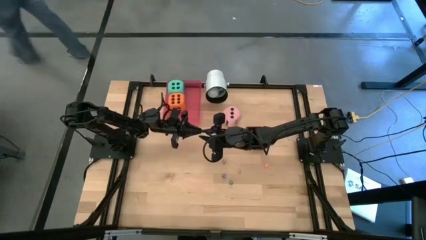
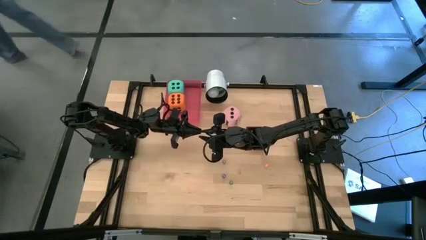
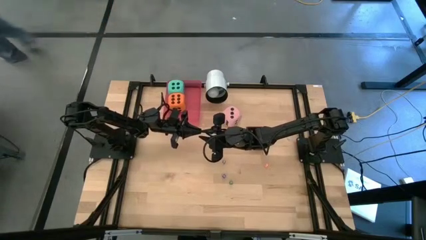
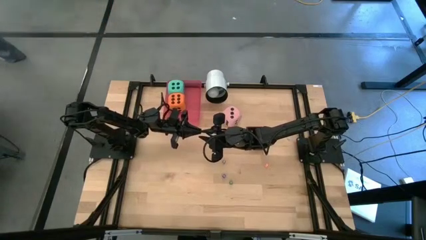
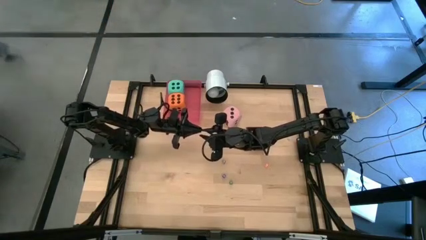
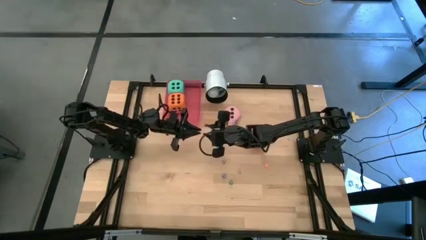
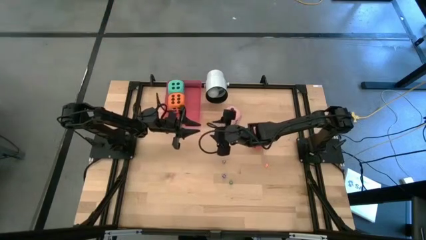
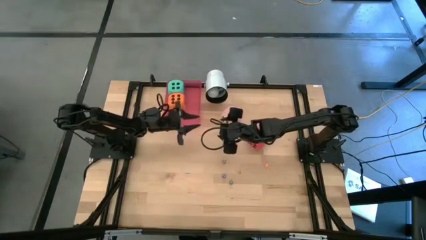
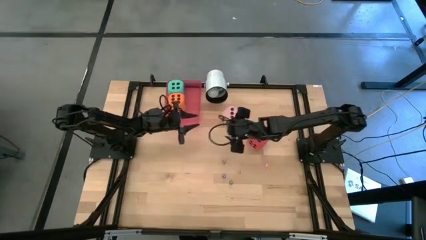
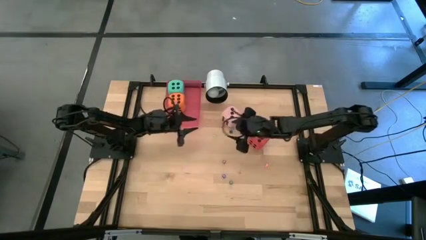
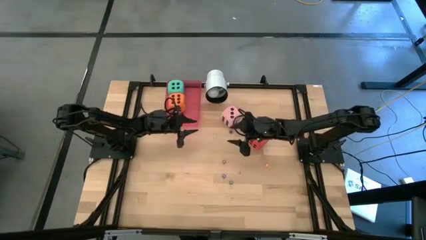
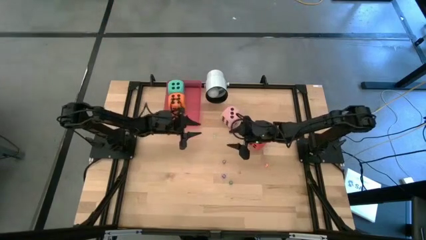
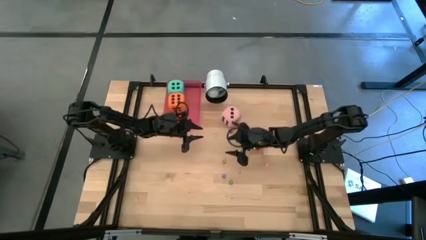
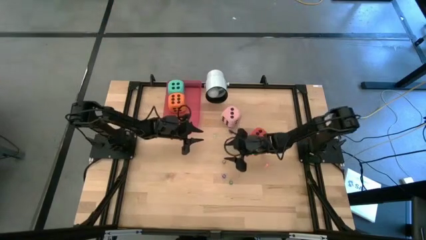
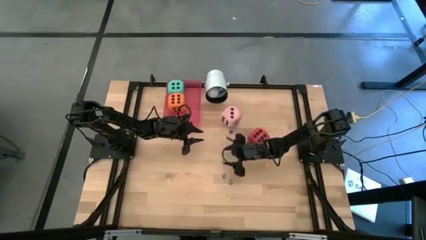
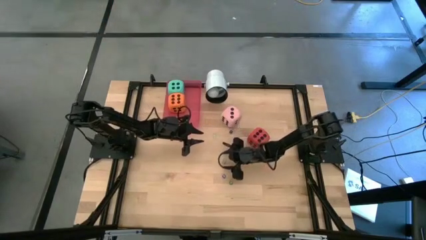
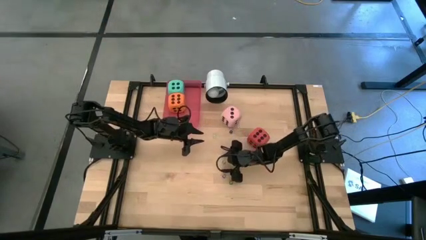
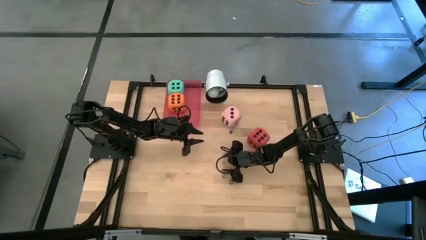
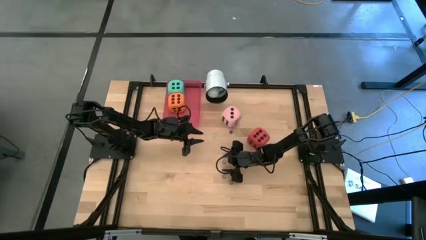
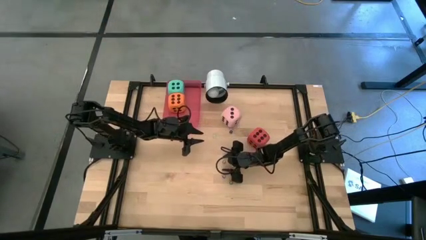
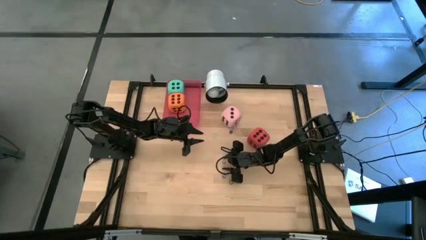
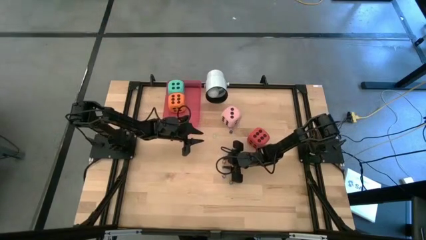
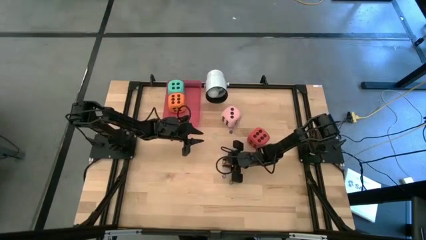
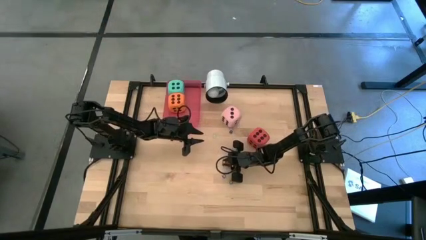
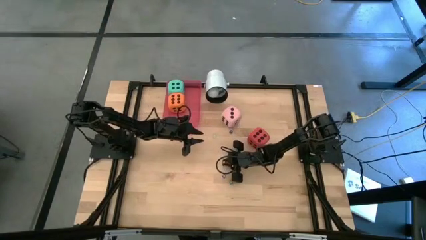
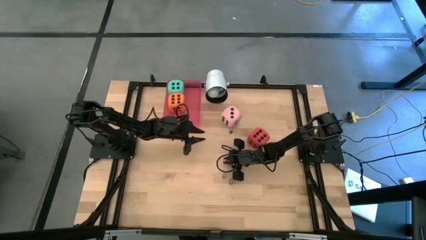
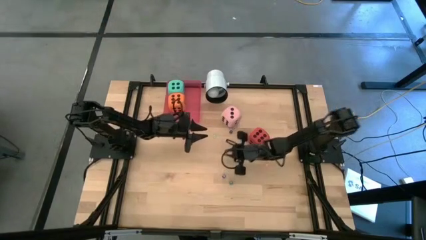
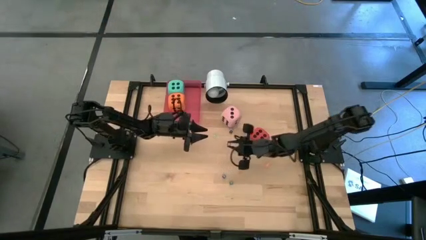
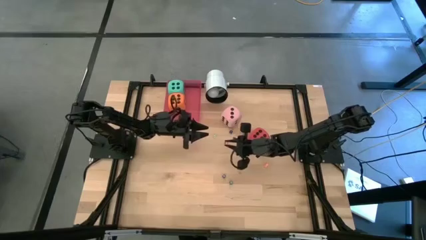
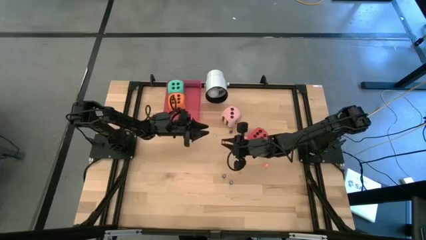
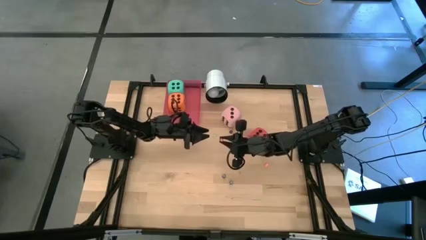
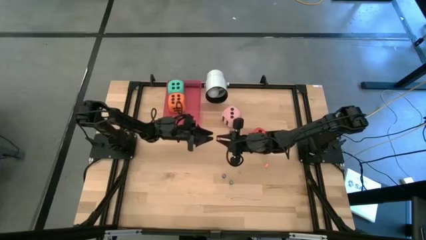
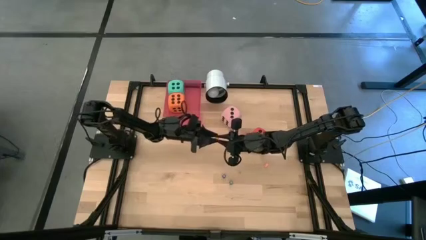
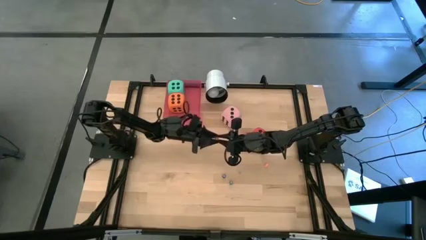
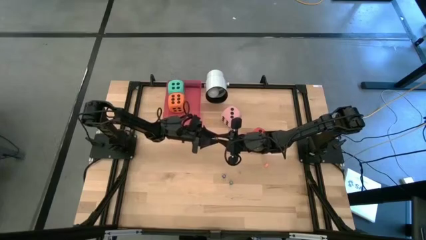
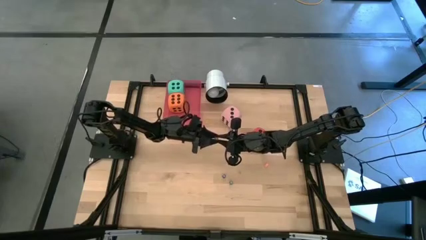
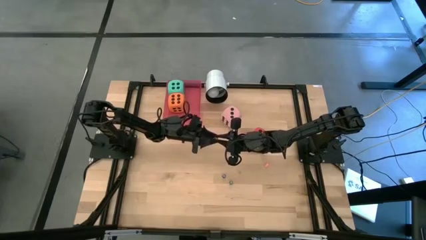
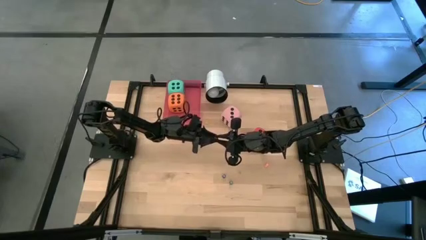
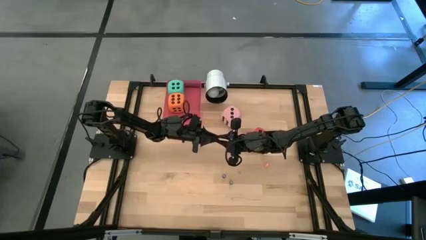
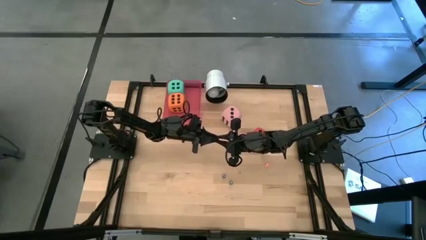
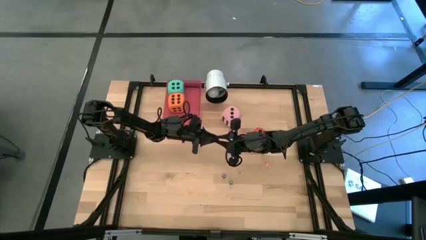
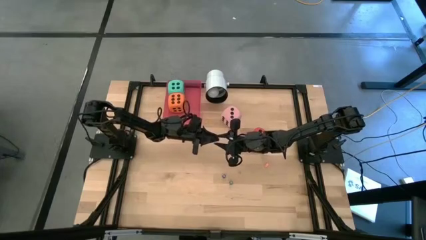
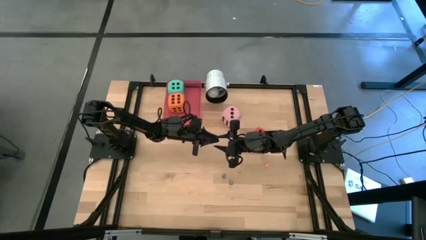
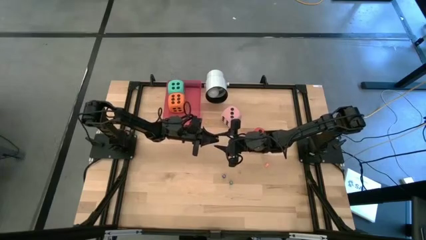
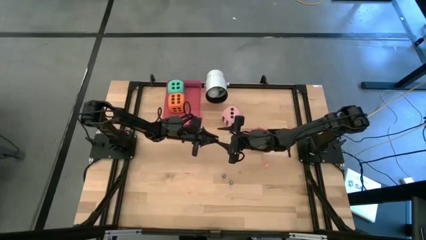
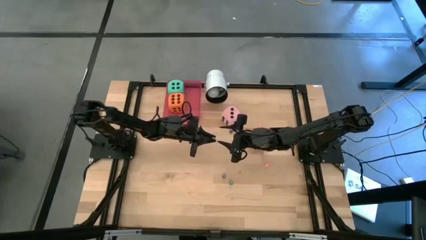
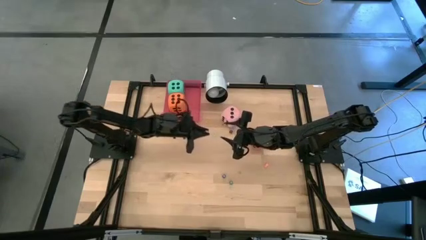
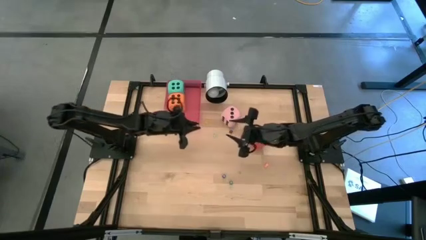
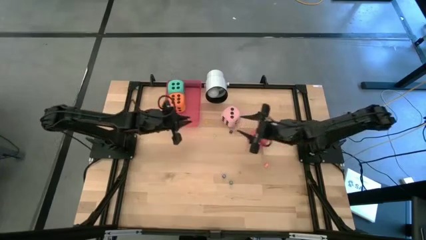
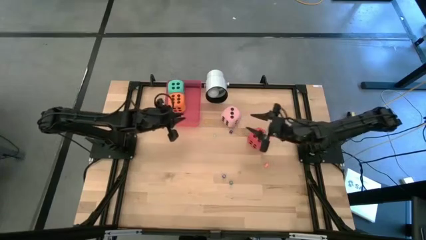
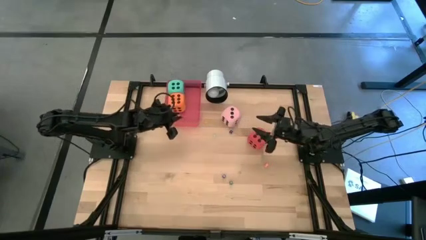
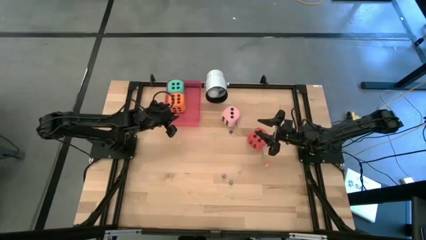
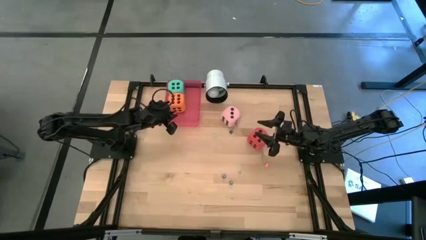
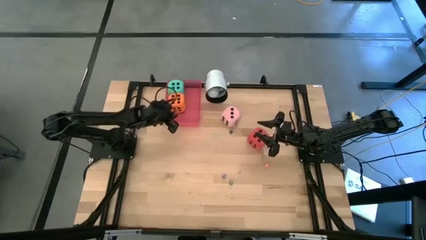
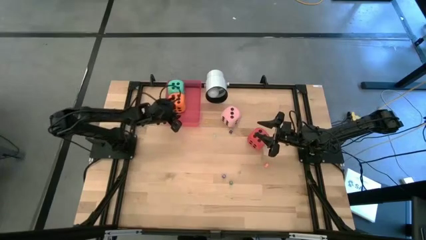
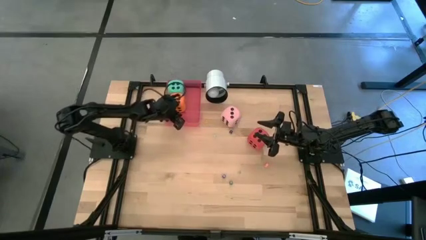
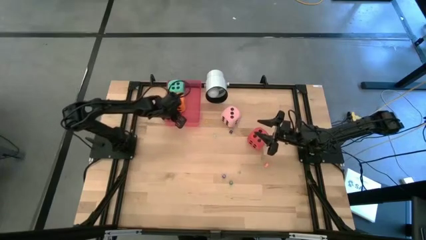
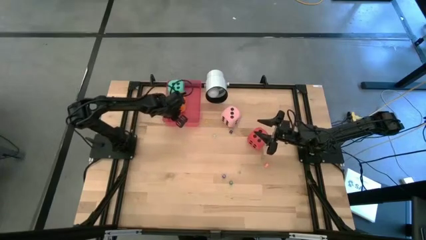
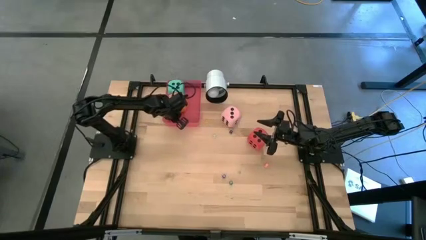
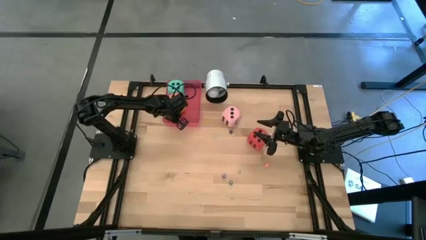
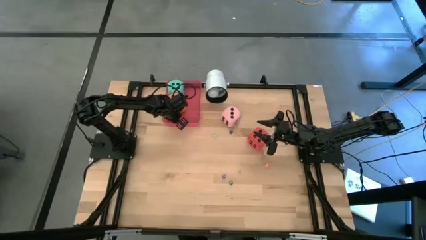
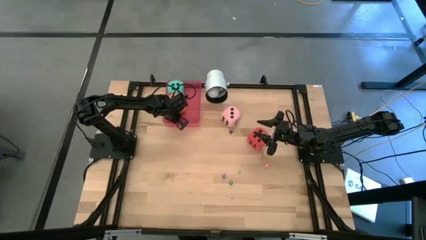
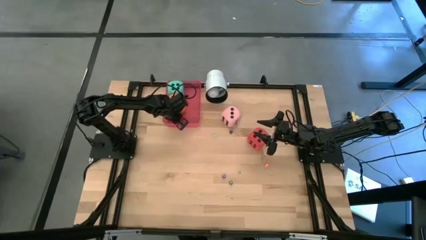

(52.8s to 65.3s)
Task: Pick & Place Dice
Put the small red dice into the red bin

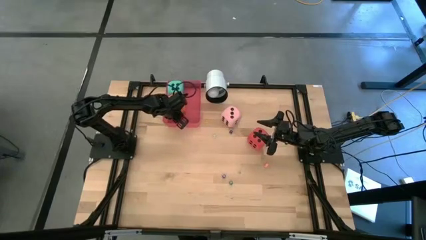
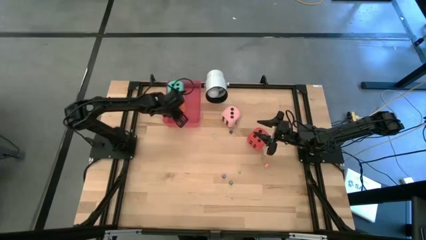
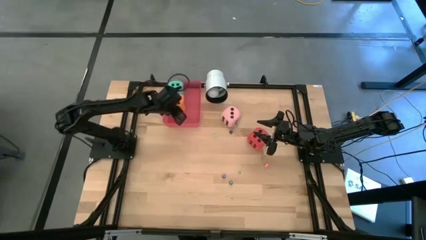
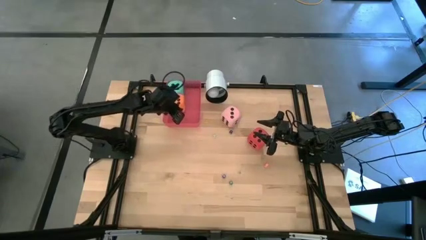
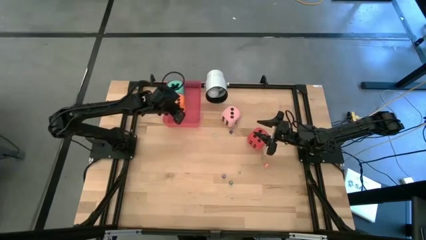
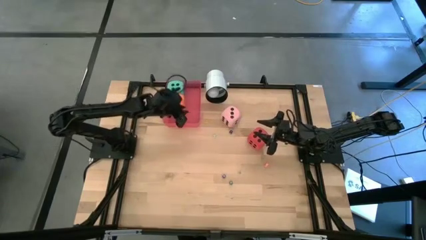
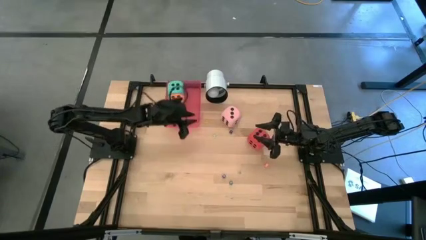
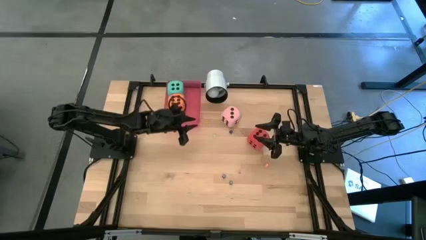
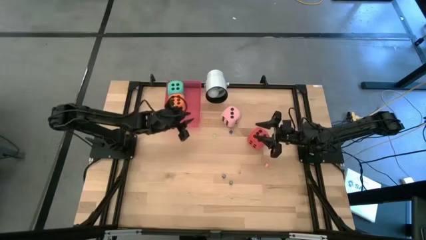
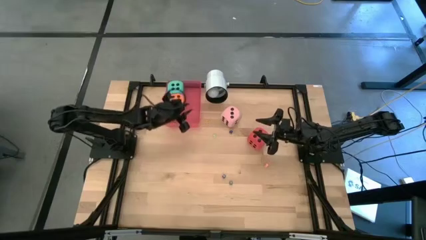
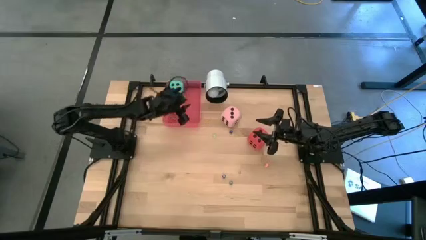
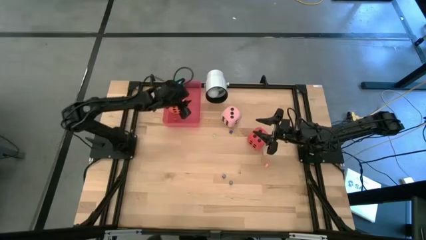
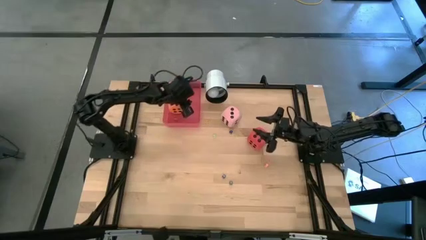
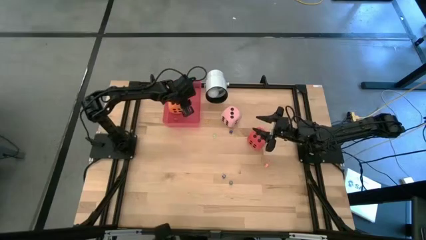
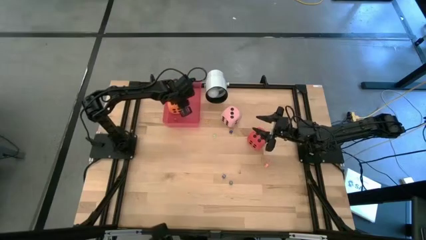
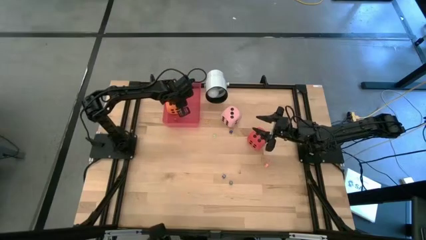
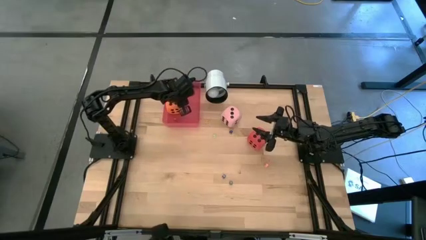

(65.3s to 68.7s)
Adjust the big orange dice
